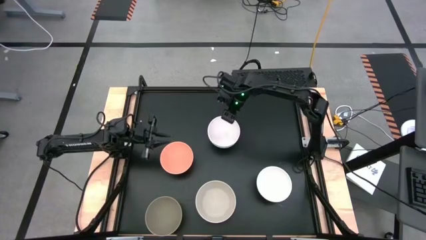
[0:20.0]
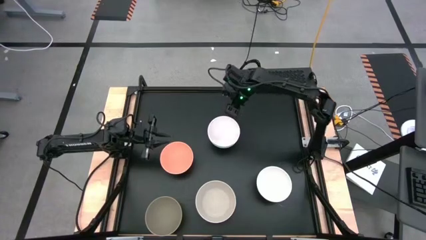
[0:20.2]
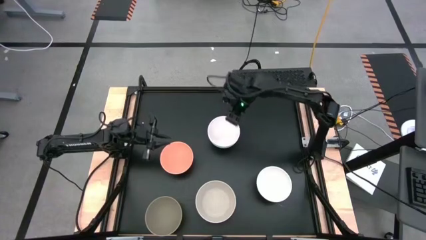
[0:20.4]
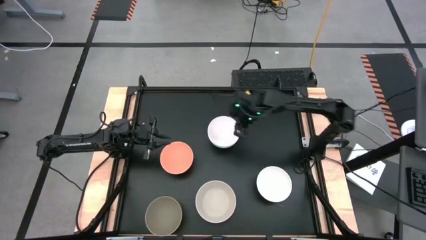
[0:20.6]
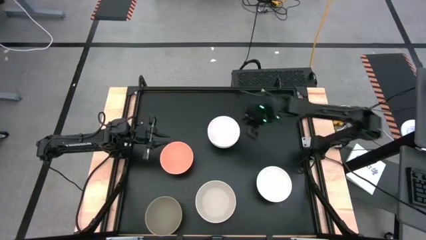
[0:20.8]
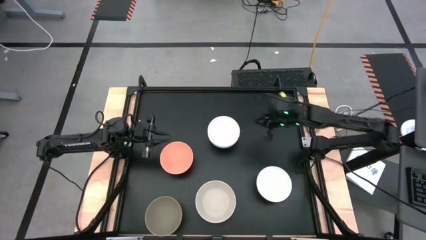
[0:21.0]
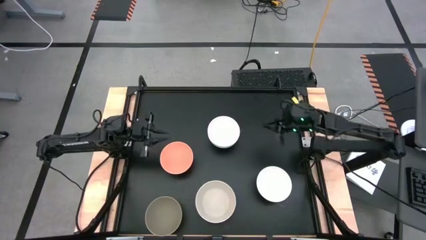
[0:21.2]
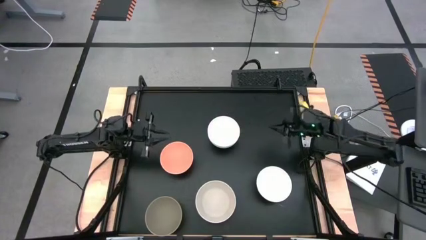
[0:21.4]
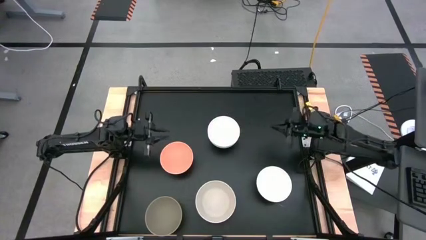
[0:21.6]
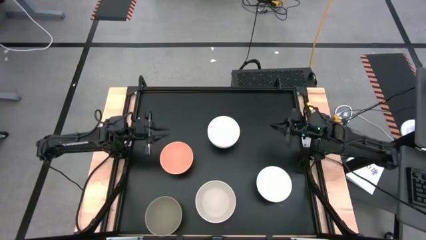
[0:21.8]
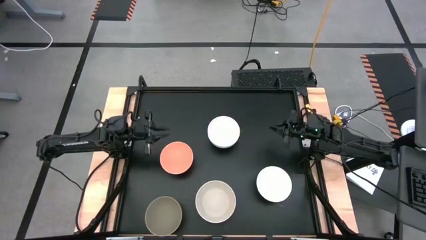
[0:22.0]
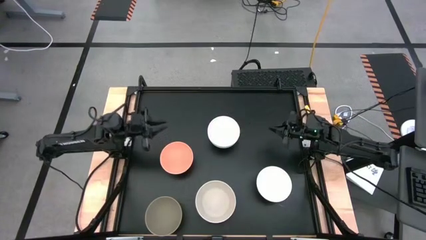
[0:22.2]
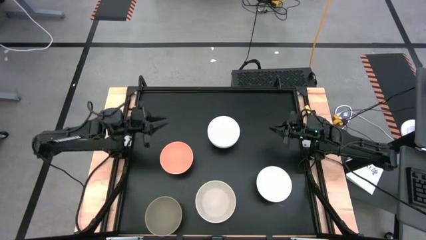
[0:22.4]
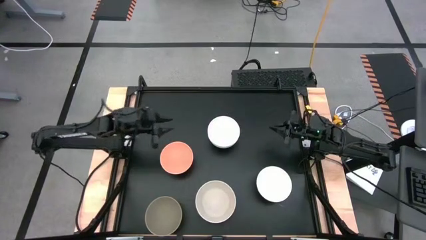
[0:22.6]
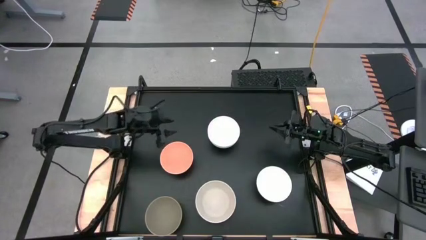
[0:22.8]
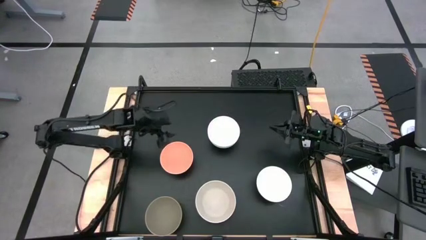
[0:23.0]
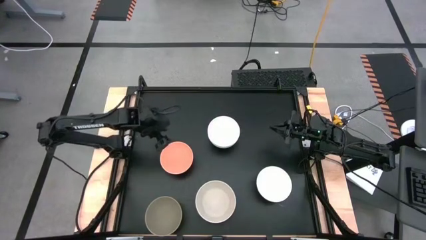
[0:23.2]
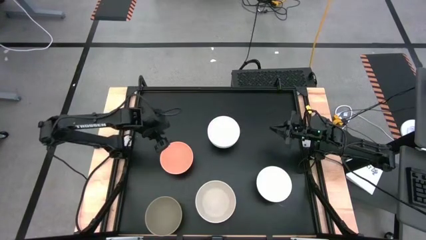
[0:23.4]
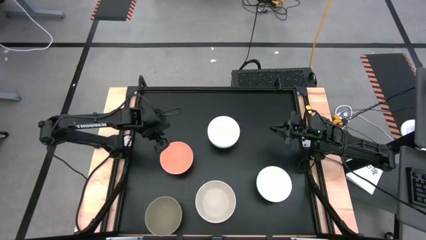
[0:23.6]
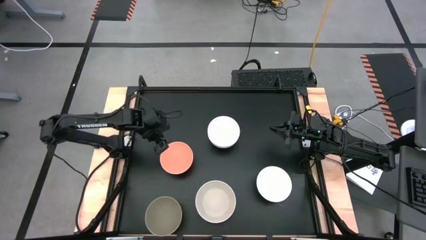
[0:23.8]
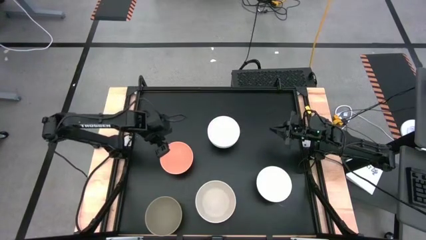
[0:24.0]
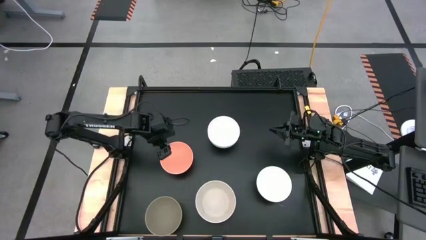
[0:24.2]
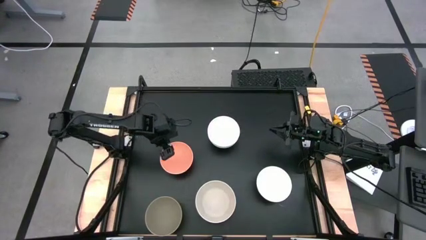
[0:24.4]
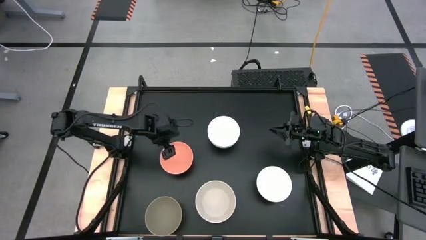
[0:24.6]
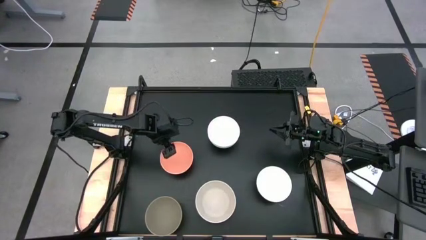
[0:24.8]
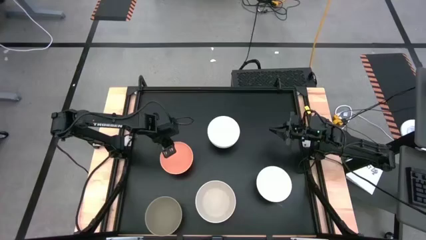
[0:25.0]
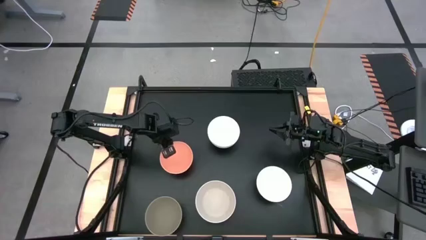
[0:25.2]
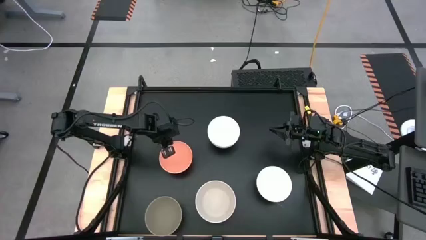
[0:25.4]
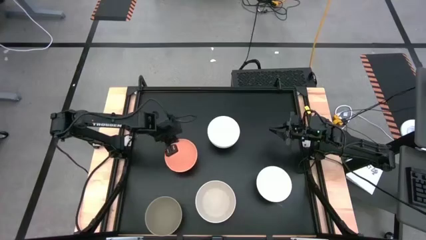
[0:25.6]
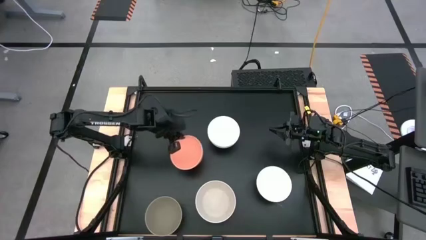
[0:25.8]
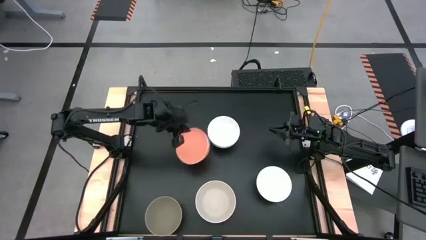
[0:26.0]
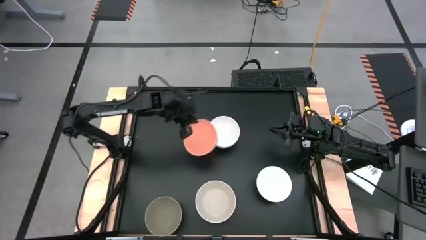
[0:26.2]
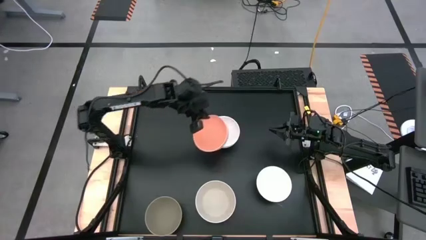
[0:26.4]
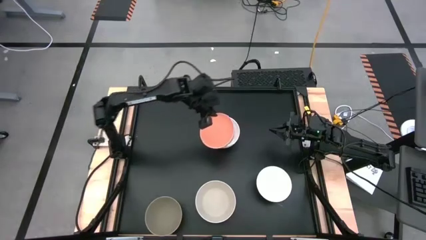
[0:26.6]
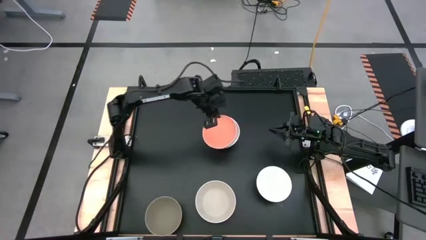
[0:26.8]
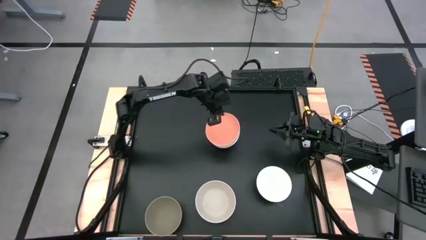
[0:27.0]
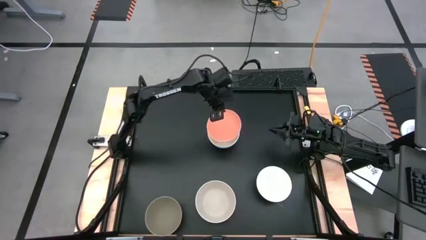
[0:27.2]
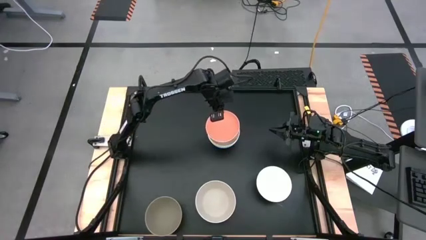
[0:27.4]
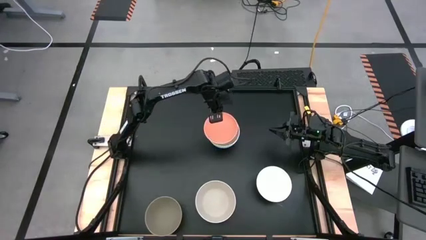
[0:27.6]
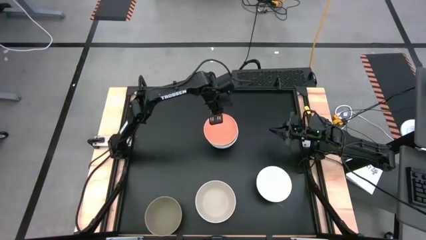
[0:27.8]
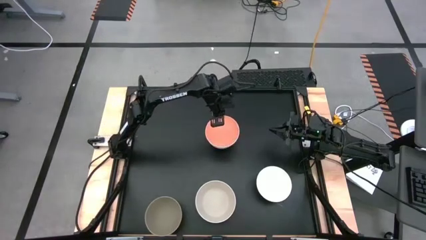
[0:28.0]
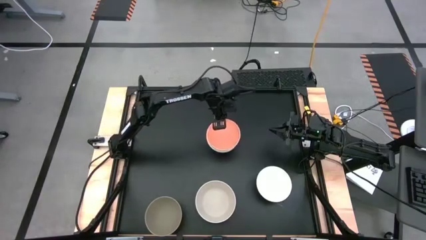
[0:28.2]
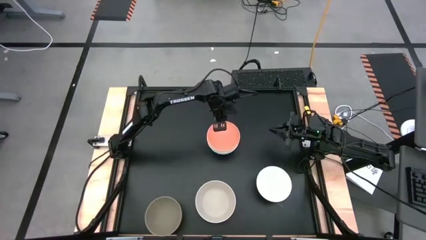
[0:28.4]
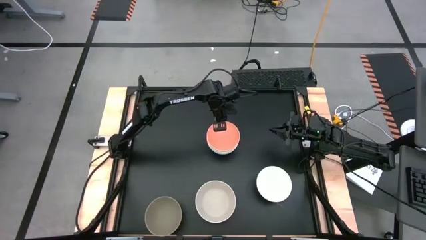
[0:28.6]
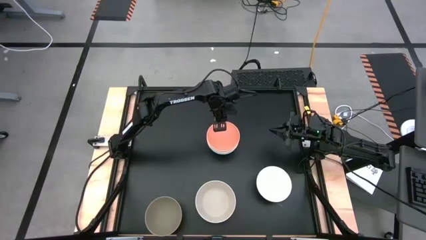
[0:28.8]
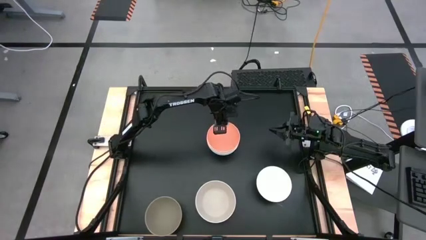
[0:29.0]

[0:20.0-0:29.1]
Task: Nest bowls inside each other
Stack the light pink bowl on the white bowl

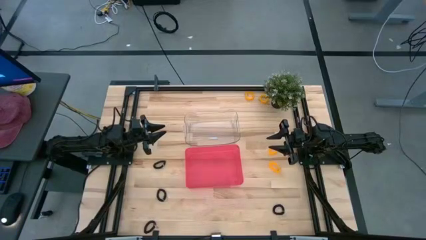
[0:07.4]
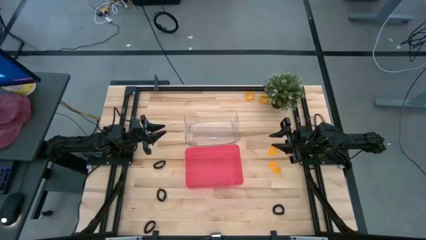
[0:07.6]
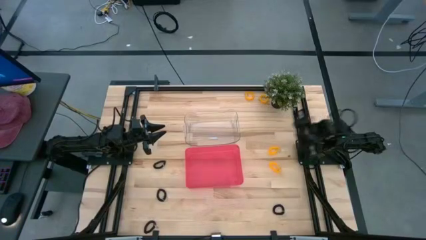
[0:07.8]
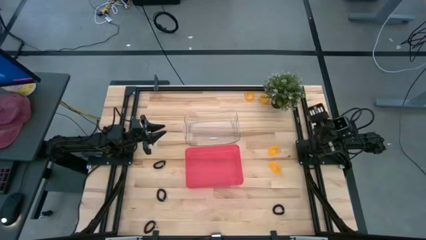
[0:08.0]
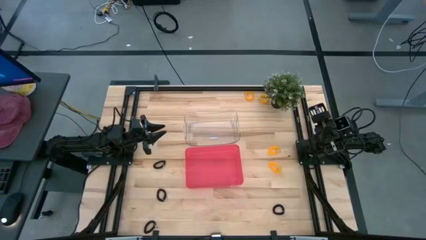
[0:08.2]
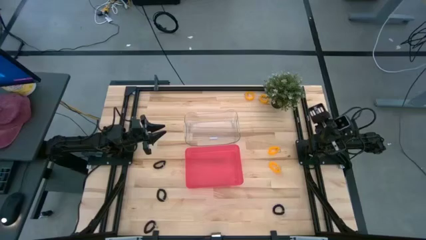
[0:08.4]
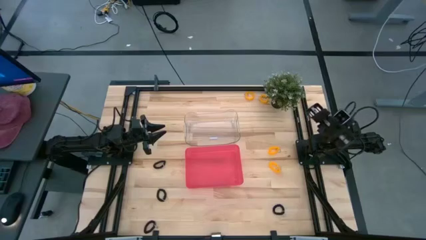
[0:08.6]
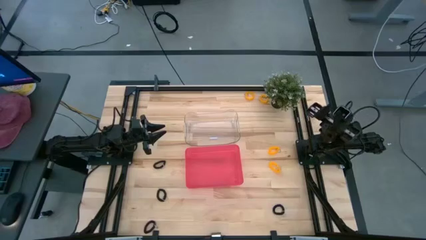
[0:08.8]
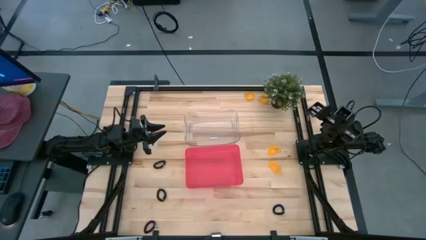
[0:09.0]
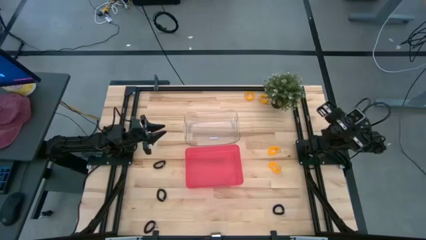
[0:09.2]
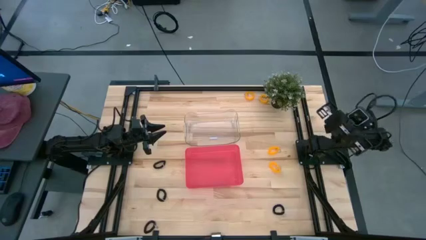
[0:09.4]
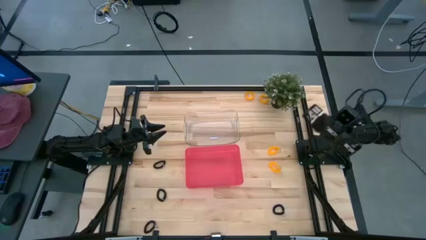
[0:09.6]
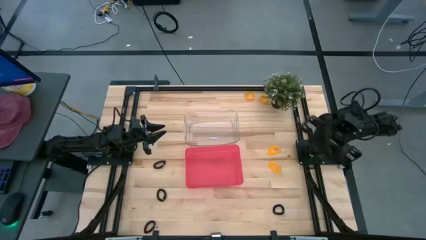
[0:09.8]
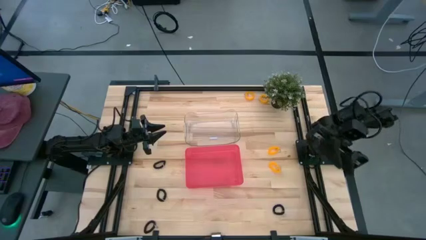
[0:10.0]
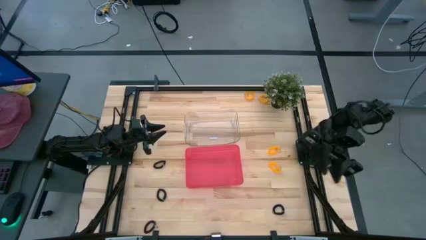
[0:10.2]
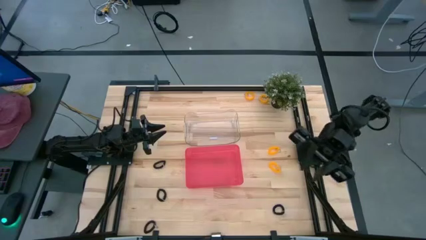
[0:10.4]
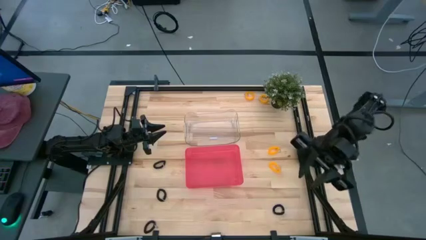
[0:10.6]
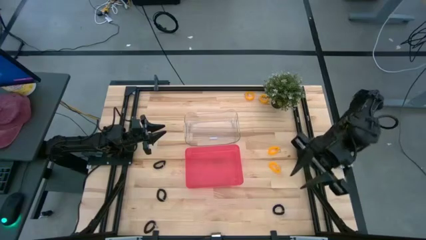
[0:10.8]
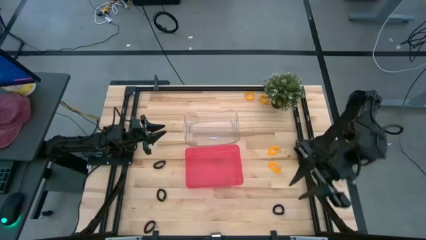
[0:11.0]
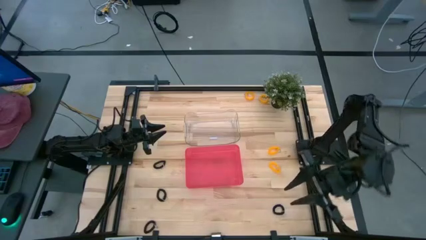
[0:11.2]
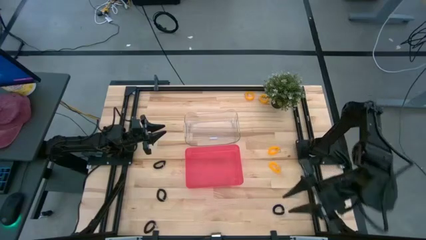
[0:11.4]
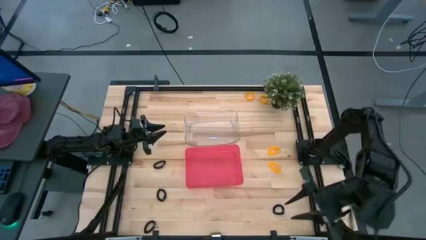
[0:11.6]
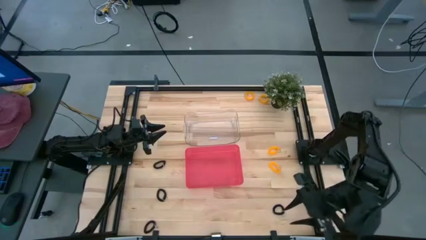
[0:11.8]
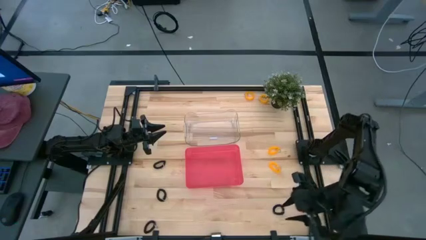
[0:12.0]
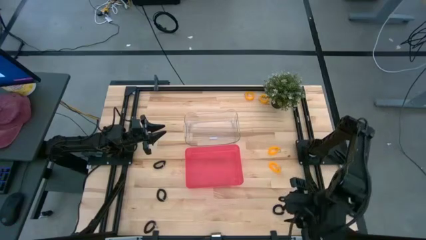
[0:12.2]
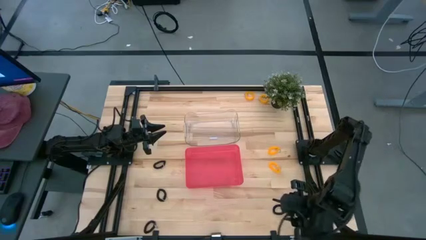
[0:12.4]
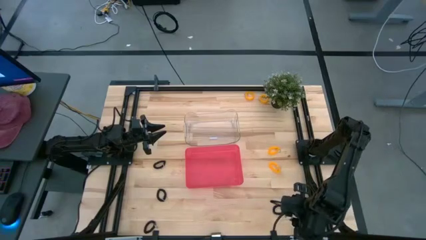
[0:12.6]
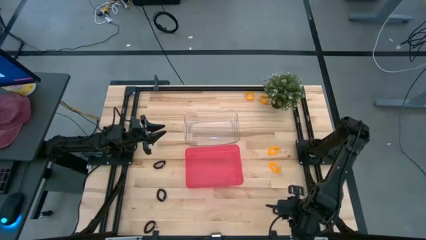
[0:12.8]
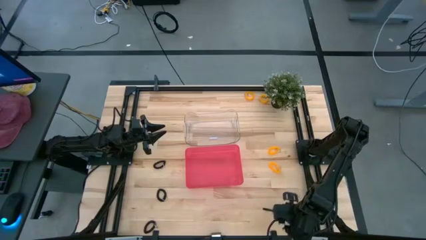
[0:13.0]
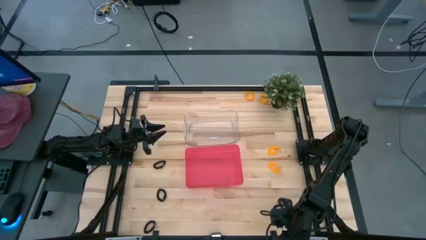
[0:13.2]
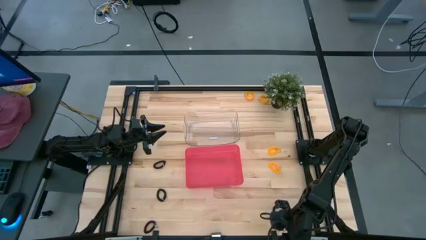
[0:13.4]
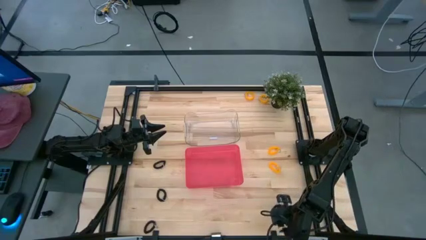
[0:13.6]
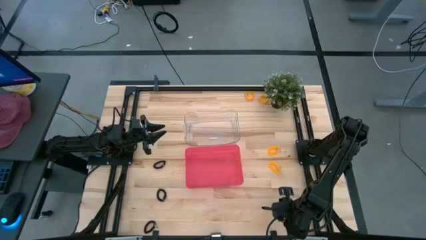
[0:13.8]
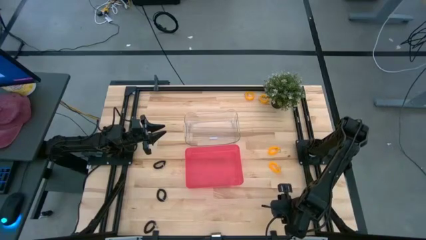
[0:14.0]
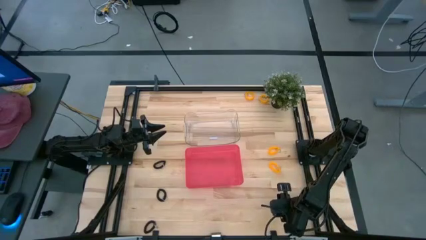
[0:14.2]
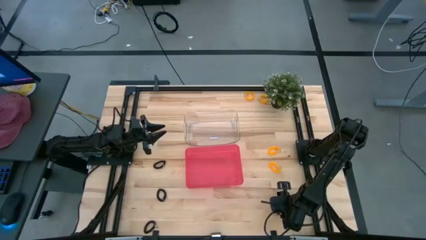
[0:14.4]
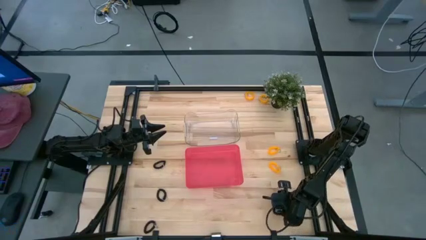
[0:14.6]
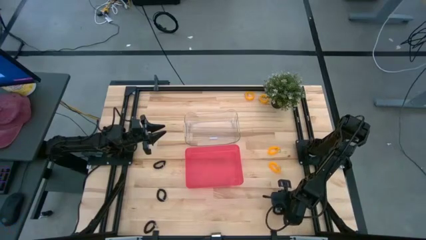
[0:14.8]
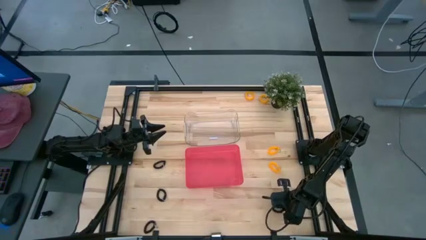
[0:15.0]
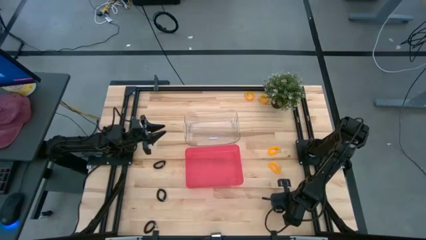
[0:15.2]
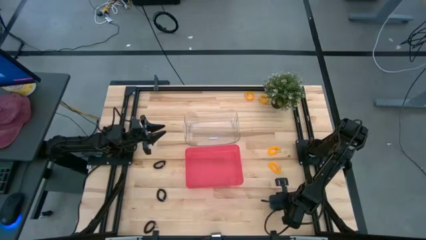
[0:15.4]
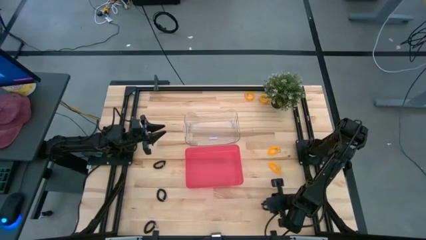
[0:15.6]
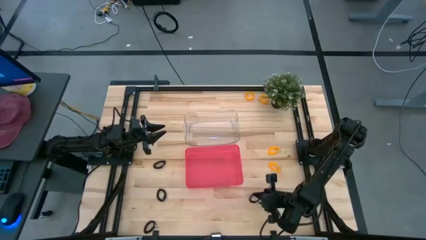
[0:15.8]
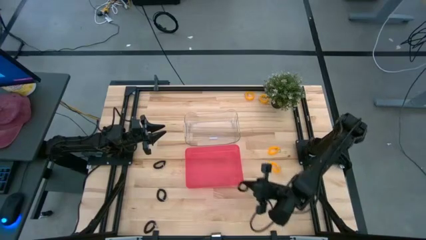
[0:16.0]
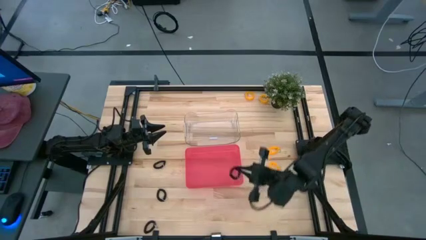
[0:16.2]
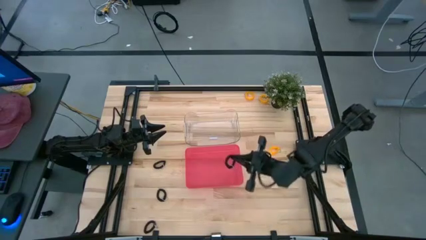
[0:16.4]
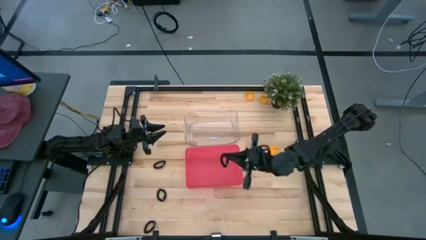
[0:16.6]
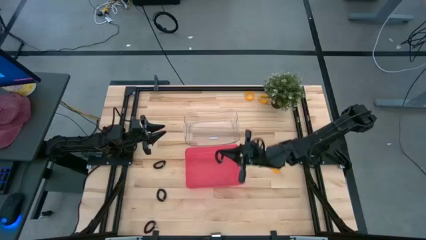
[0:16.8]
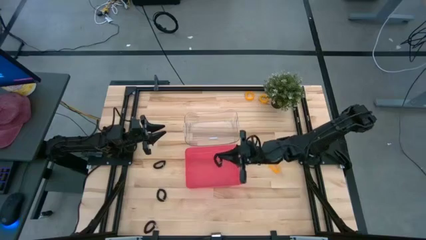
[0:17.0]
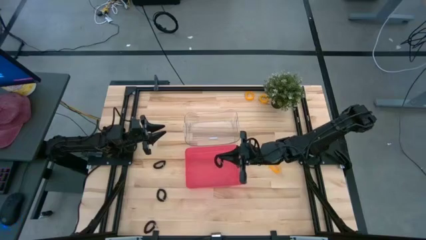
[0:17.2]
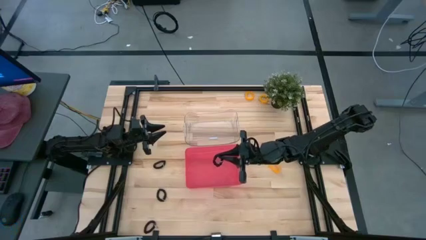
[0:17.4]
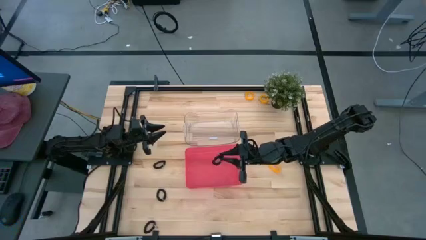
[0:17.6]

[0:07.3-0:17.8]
Task: Sort spring keychains
Put the black spring keychain into the red bin
